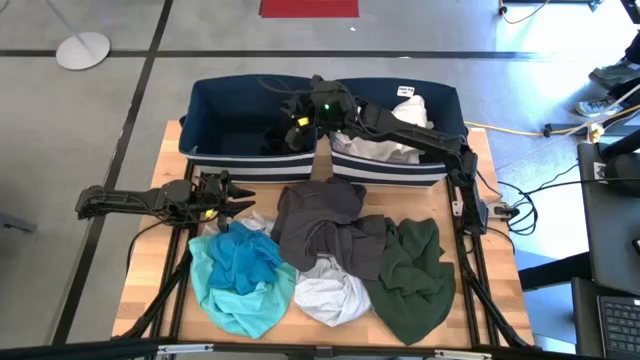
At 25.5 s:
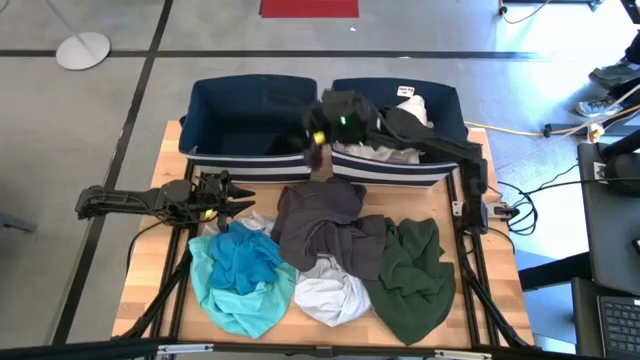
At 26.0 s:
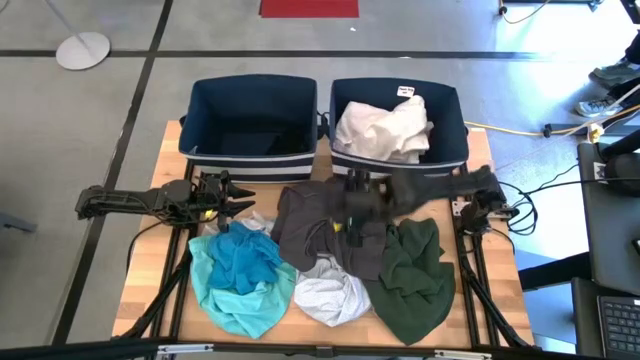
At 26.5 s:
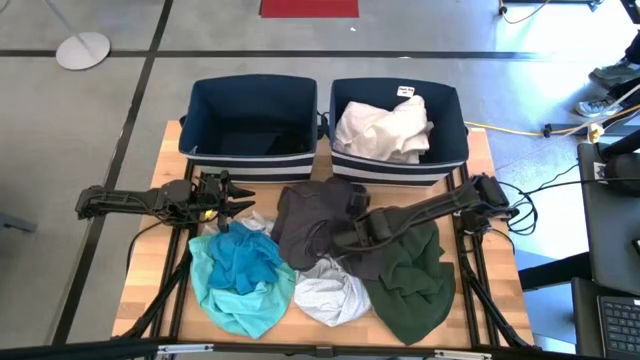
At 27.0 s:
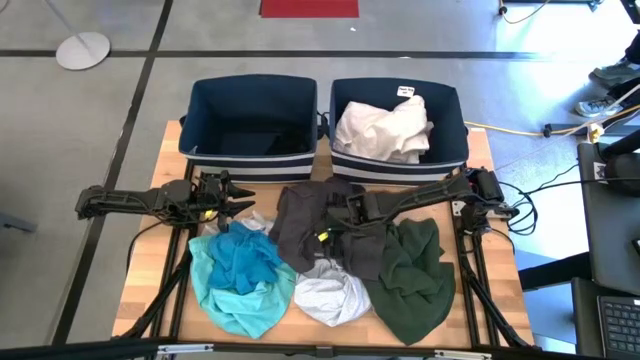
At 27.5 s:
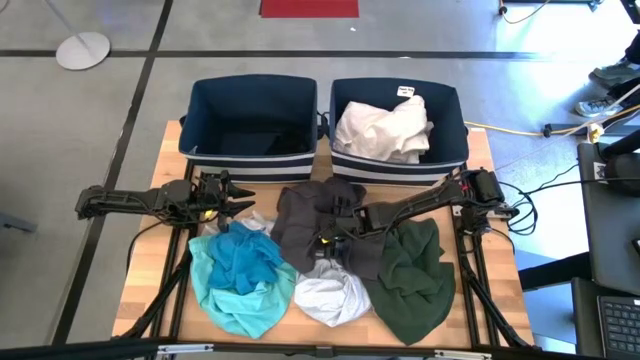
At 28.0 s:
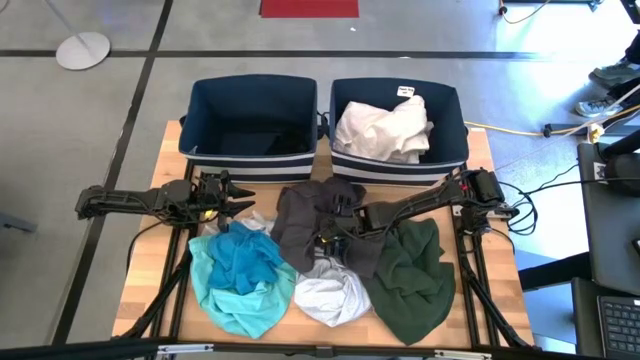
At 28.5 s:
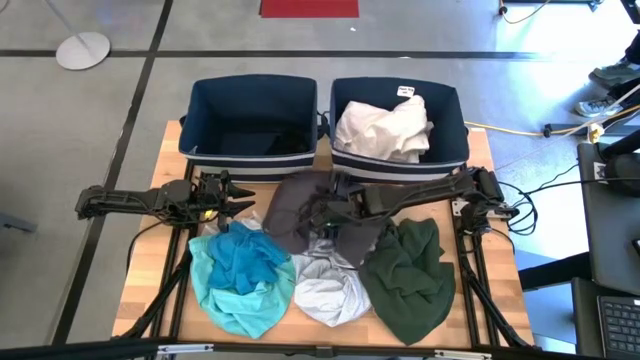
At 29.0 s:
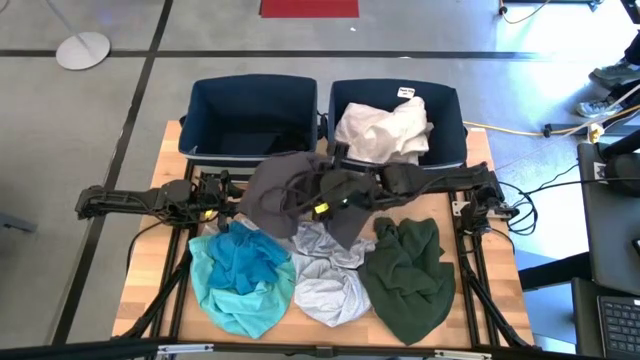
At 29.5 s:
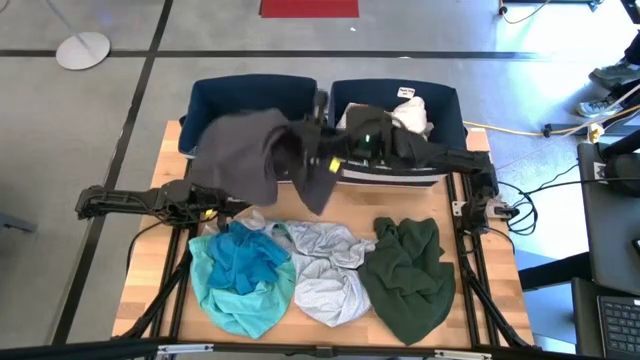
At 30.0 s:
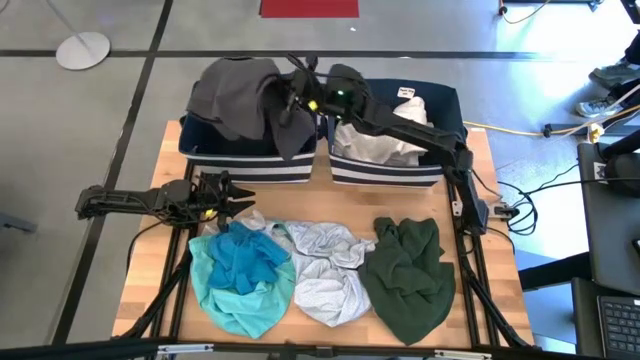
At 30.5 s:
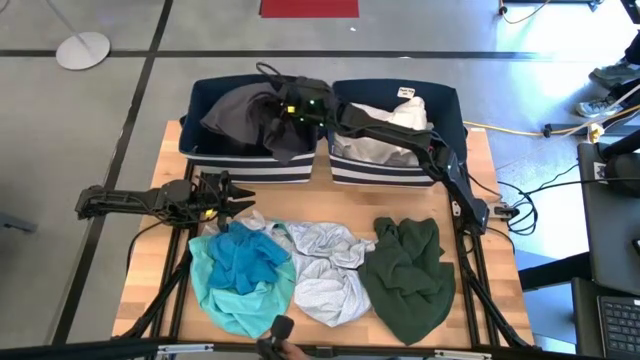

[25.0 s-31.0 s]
Task: Sort clothes
Put the gray shorts into the left blue laundry bin

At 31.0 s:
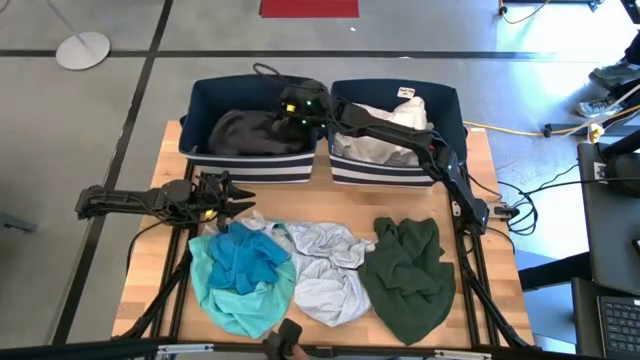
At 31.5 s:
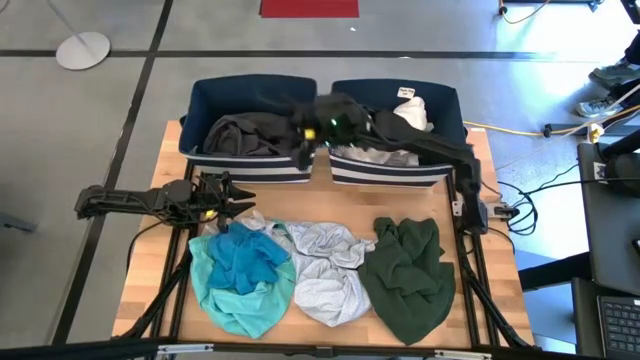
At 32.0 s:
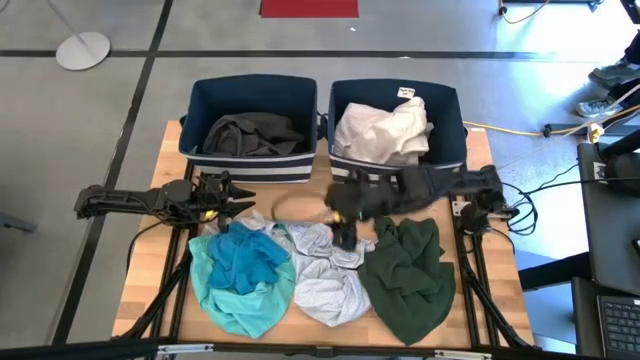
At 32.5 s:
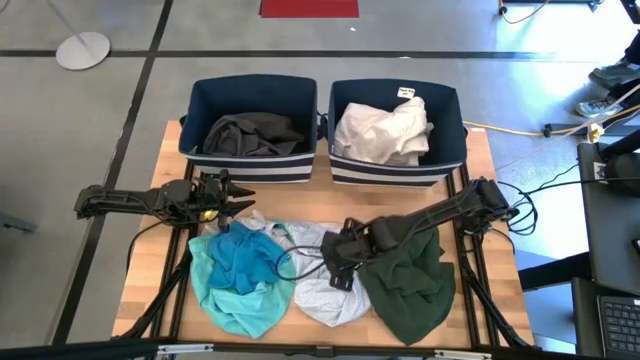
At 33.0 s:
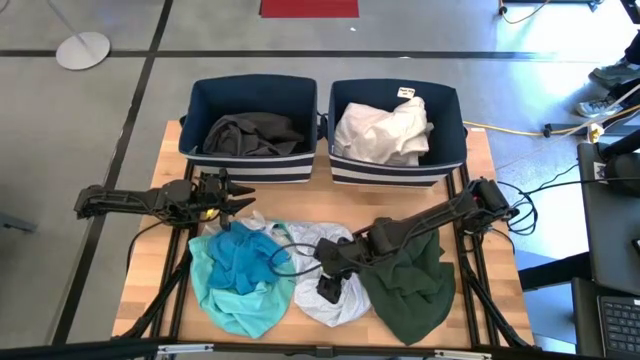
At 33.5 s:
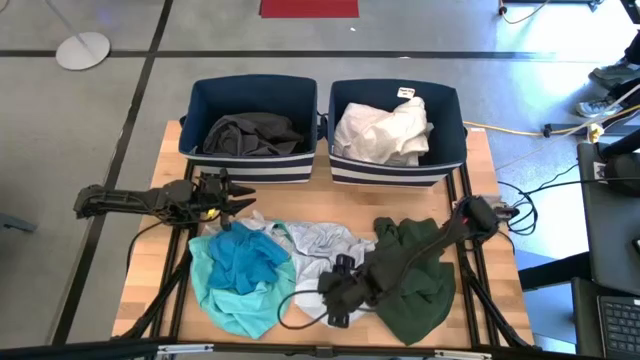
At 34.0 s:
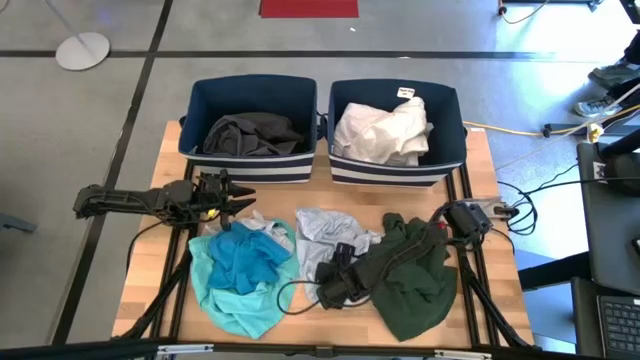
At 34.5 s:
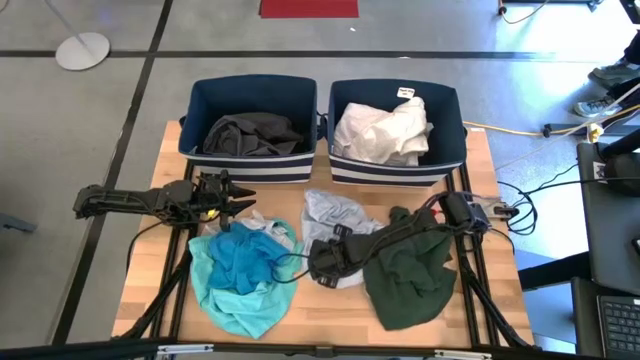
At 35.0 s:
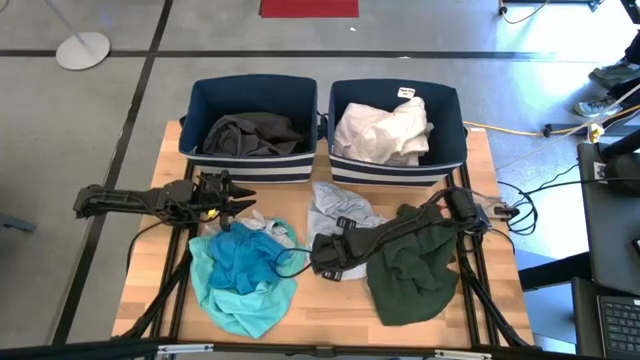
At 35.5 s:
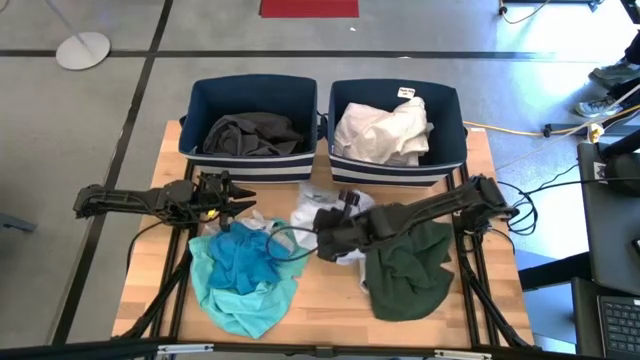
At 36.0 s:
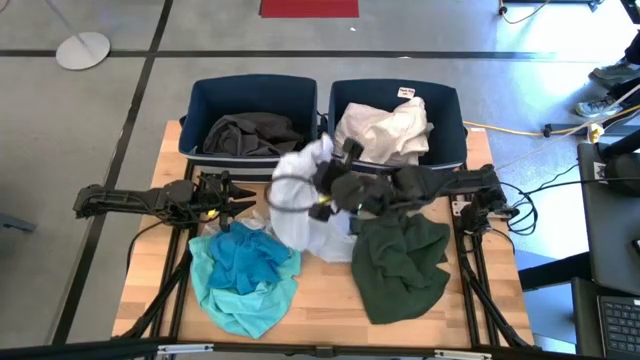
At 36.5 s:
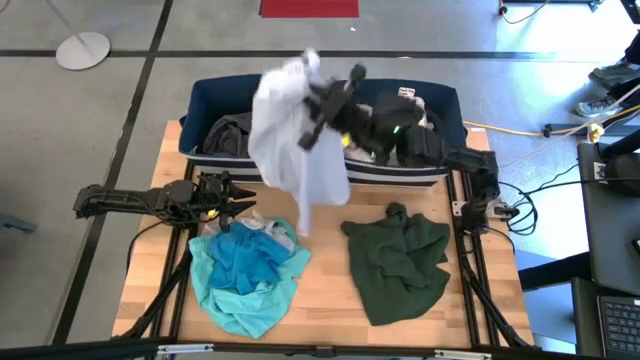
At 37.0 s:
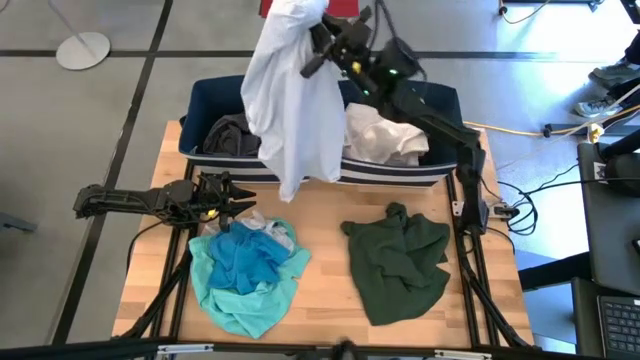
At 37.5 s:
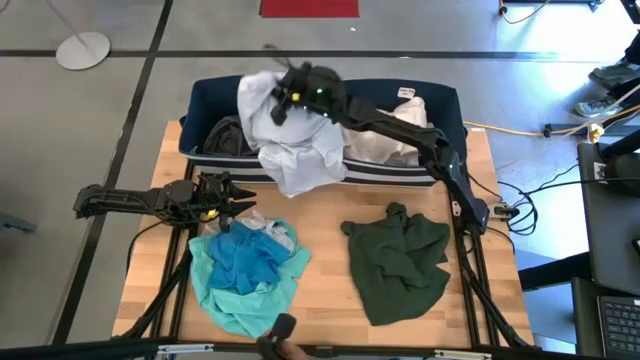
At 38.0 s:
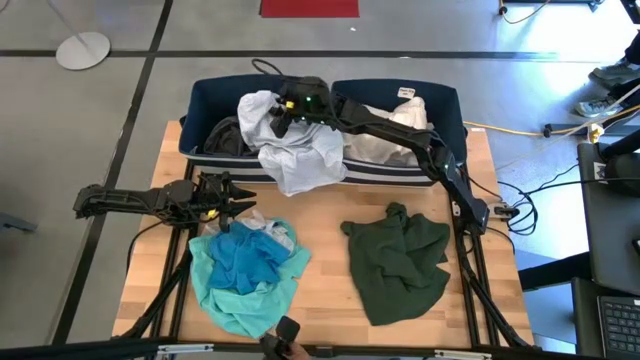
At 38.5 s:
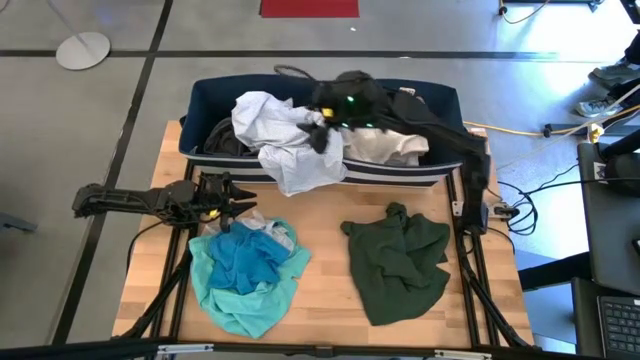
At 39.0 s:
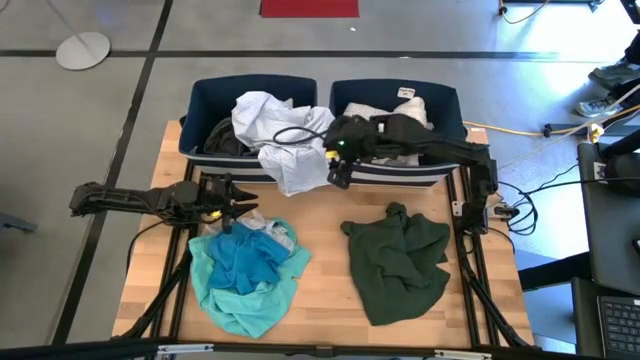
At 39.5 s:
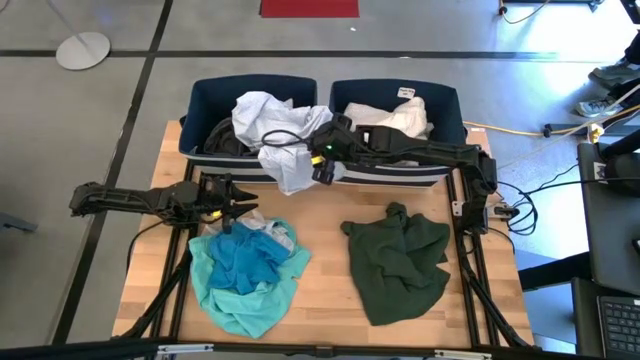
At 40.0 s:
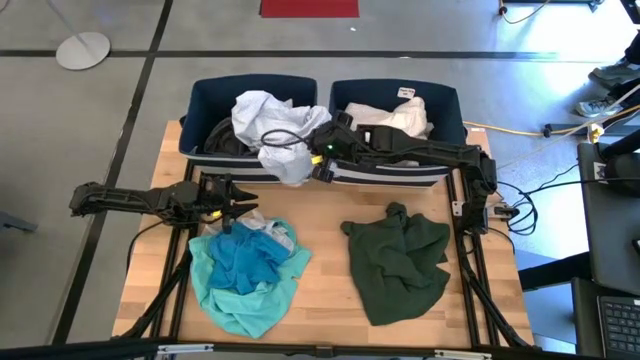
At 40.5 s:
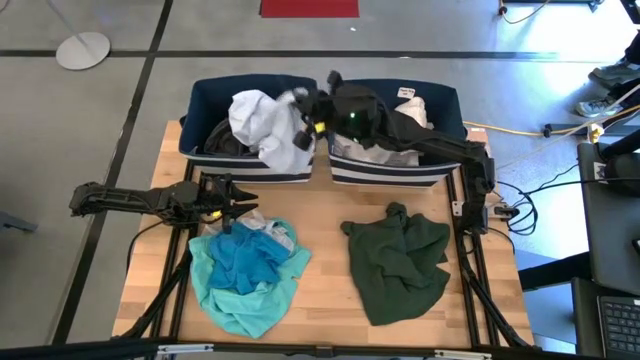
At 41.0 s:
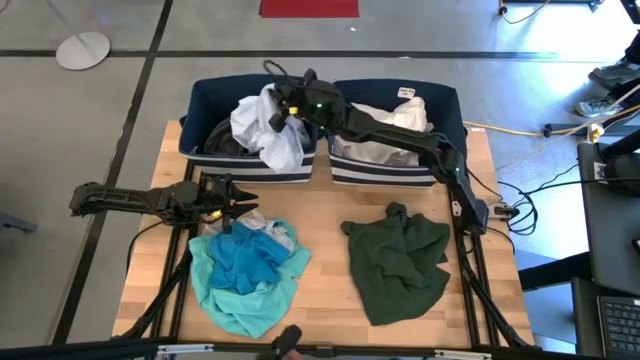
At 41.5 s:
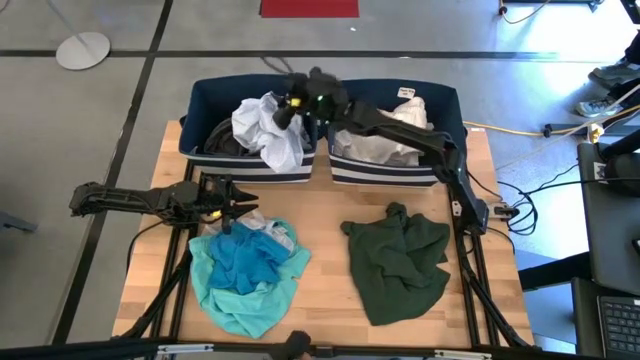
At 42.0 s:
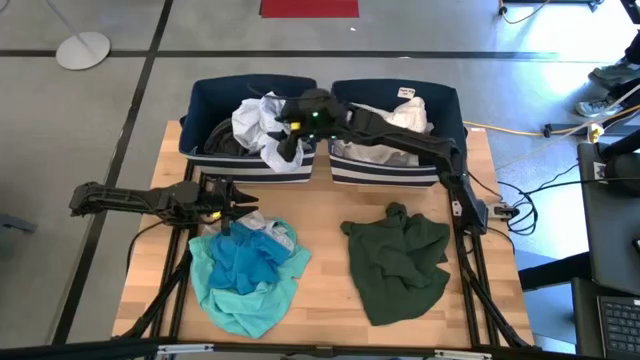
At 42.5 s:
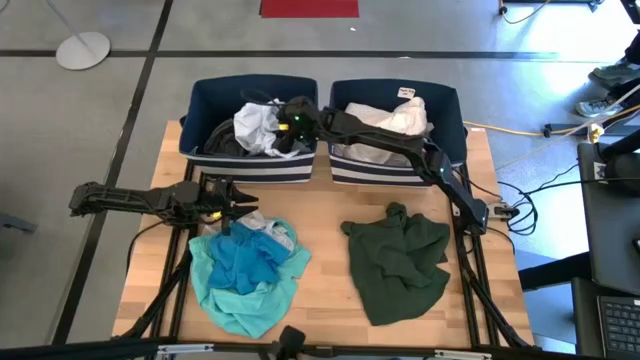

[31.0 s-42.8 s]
Put the blue patterned shirt into the left blue laundry bin

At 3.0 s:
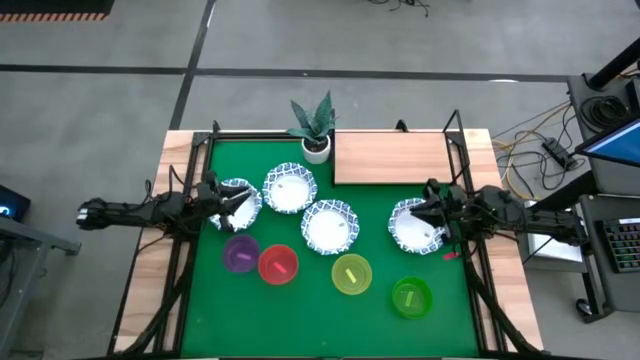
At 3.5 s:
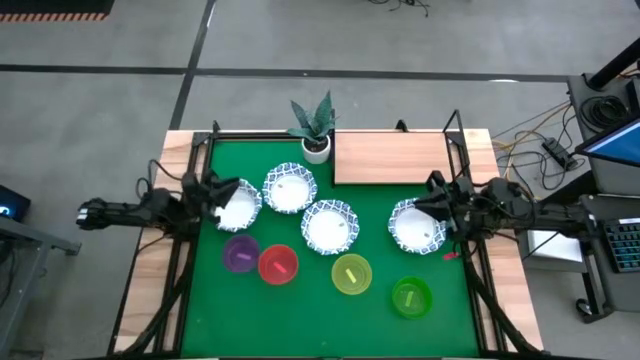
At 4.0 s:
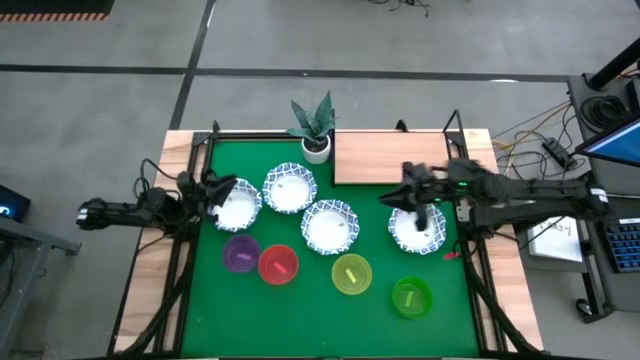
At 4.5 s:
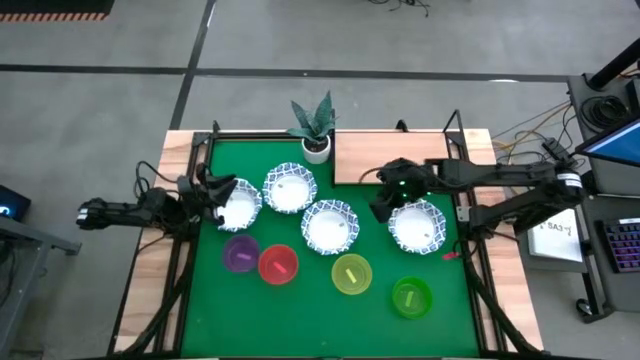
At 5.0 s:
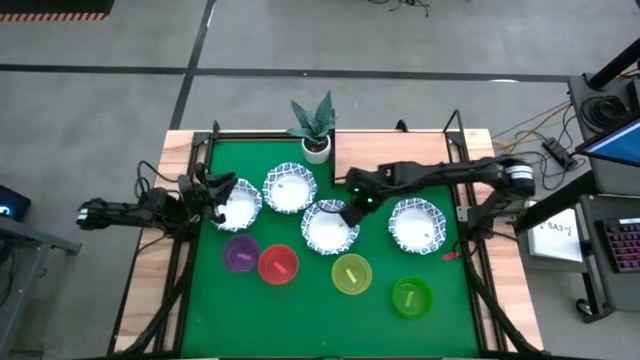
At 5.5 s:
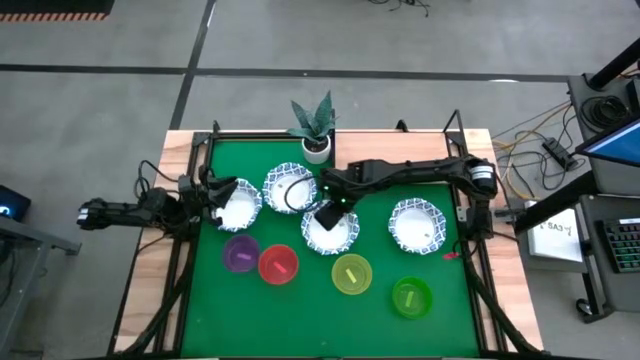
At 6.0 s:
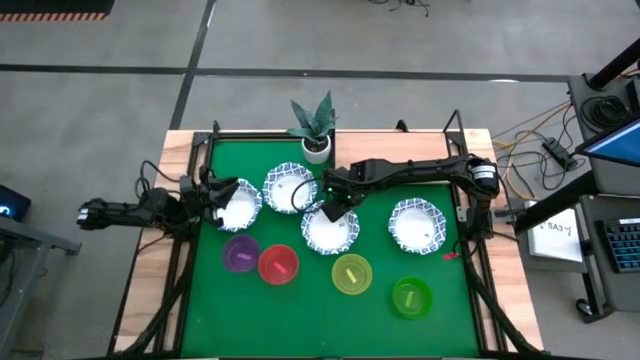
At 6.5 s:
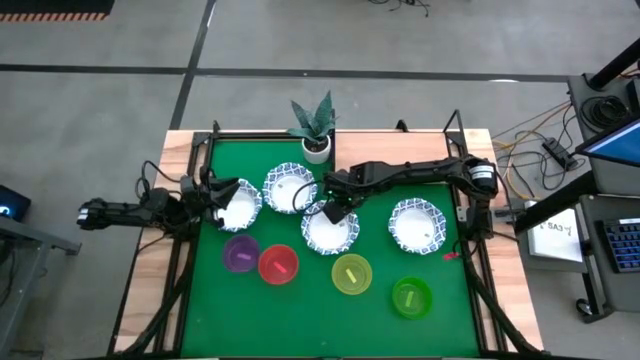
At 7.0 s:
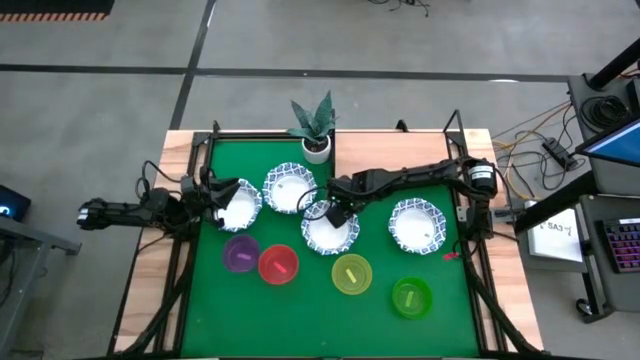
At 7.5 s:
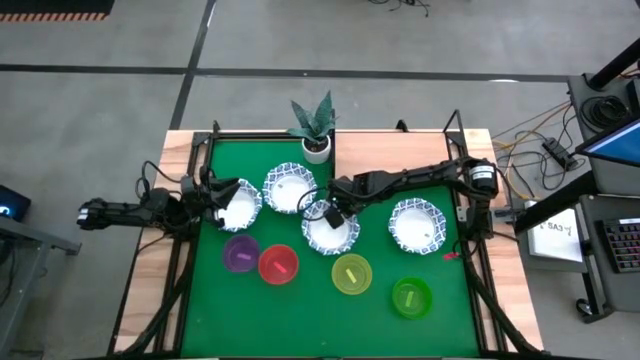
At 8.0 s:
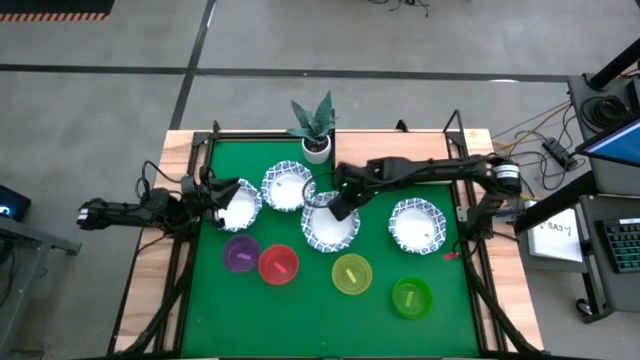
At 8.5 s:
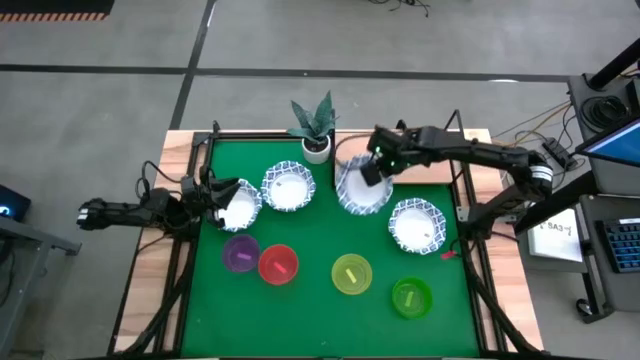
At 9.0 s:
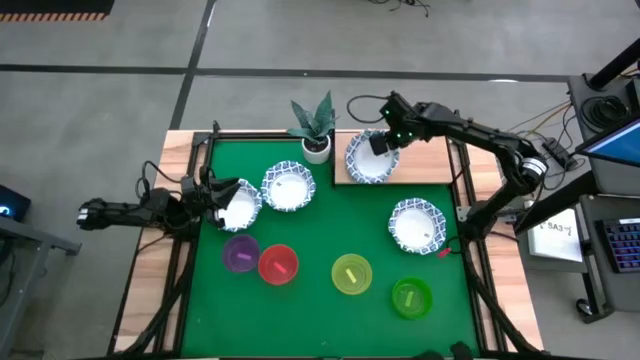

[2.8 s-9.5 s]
Task: Place and stack bowls onto a shelf
Put the white and blue bowl on the shelf
